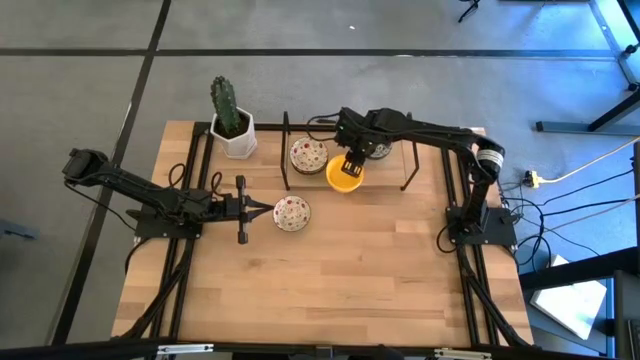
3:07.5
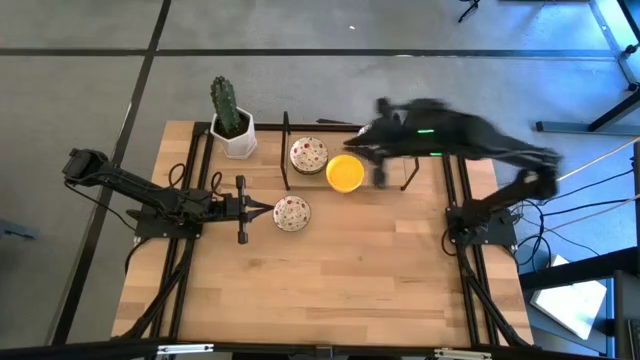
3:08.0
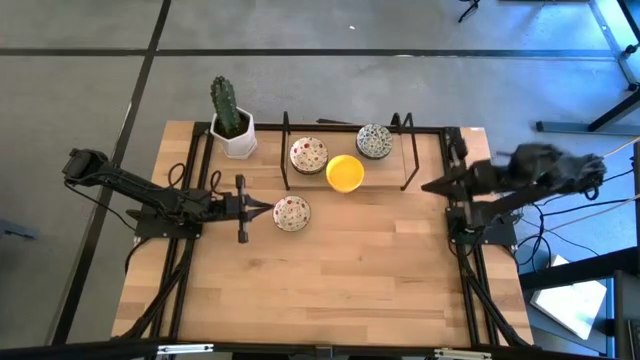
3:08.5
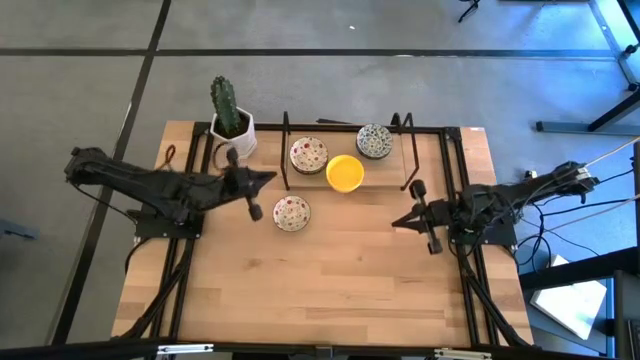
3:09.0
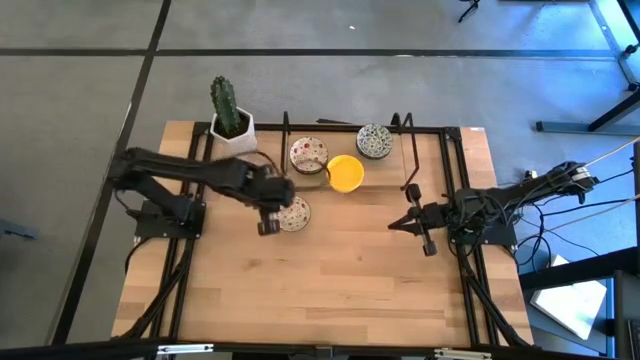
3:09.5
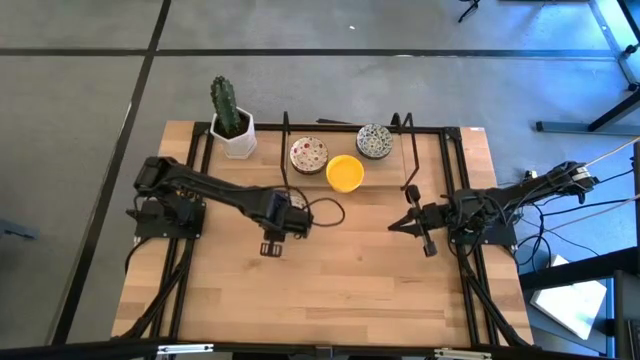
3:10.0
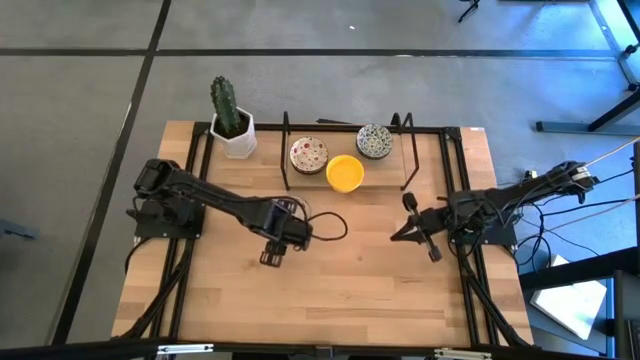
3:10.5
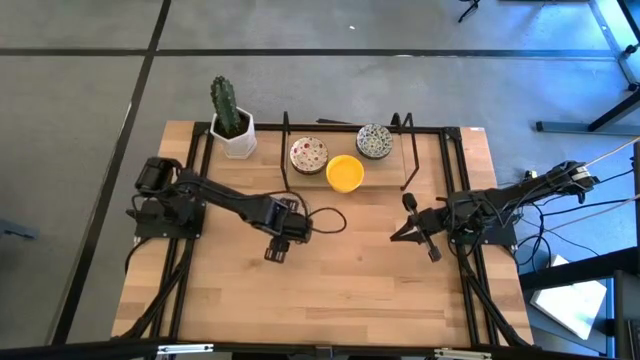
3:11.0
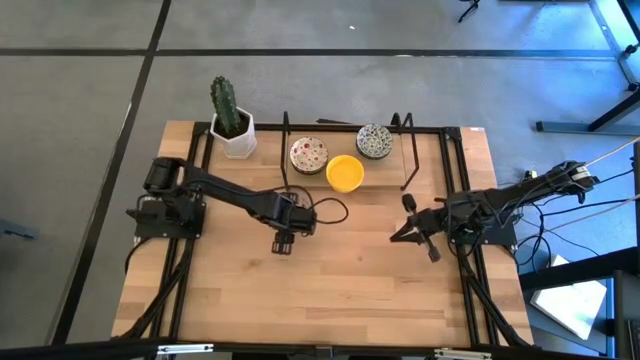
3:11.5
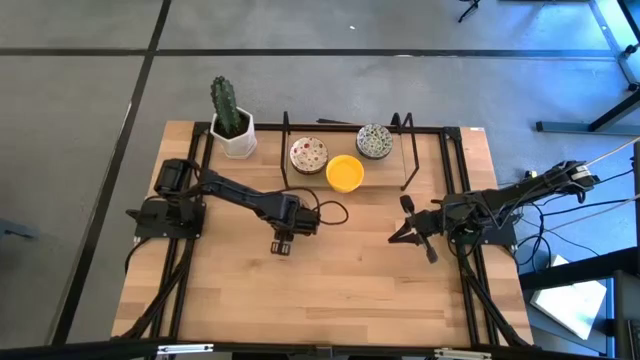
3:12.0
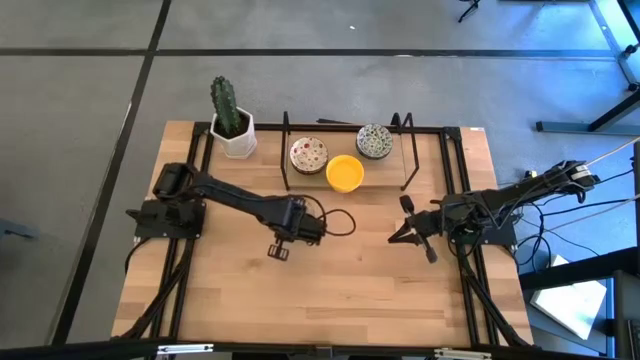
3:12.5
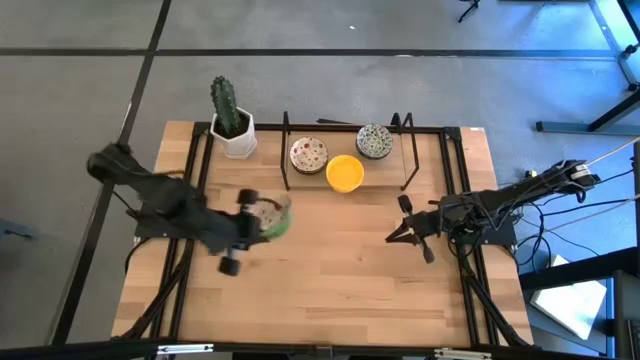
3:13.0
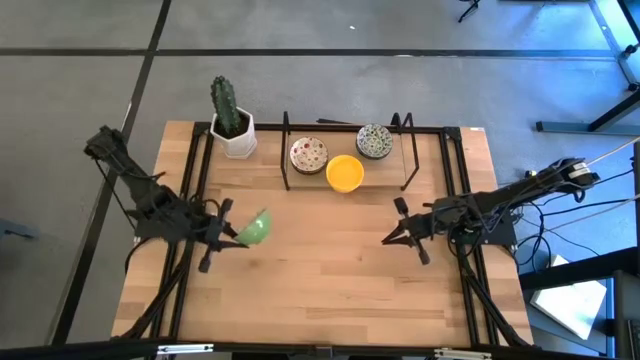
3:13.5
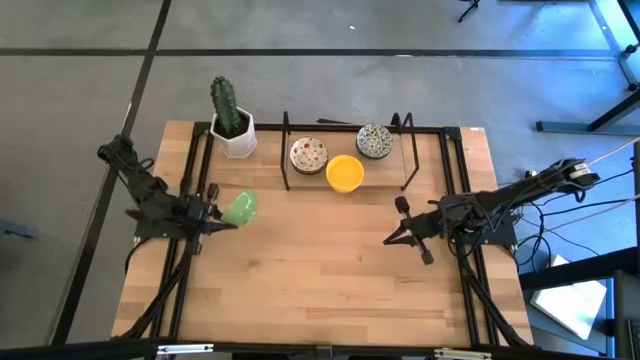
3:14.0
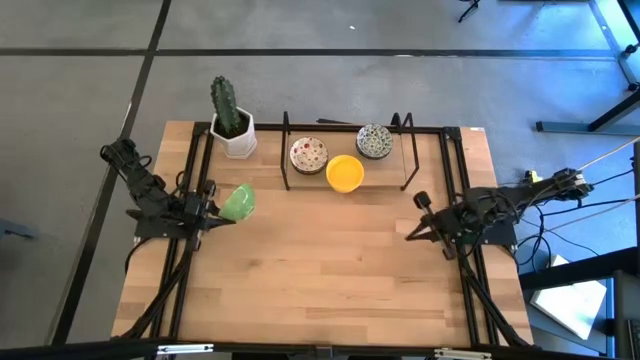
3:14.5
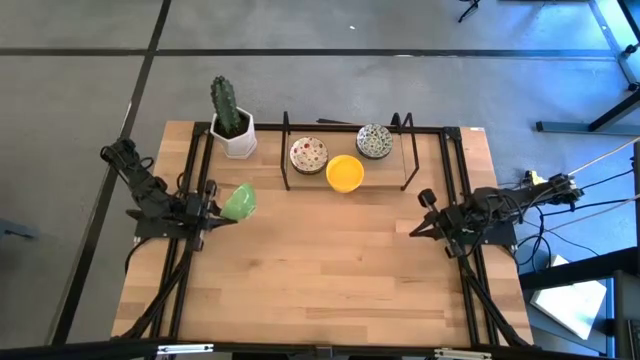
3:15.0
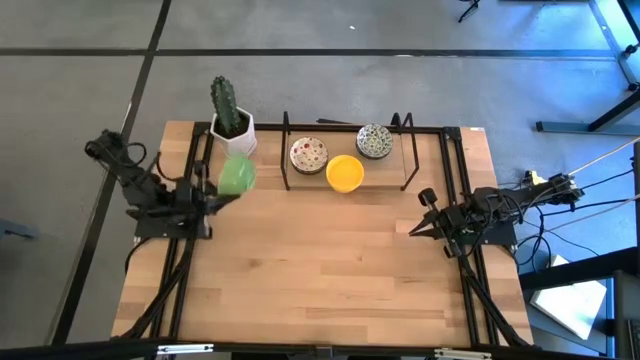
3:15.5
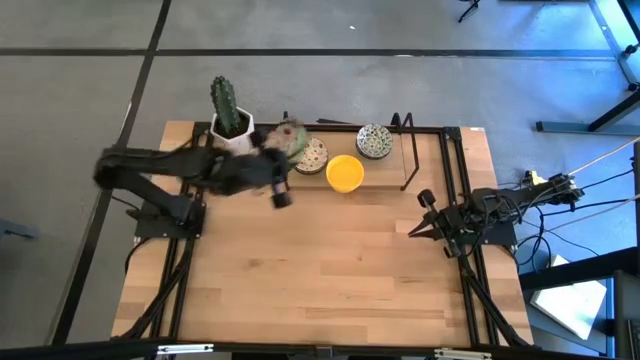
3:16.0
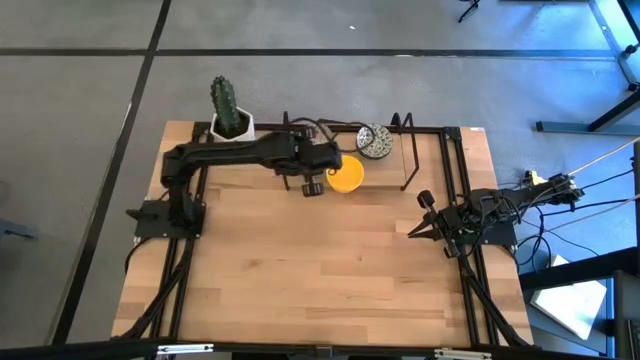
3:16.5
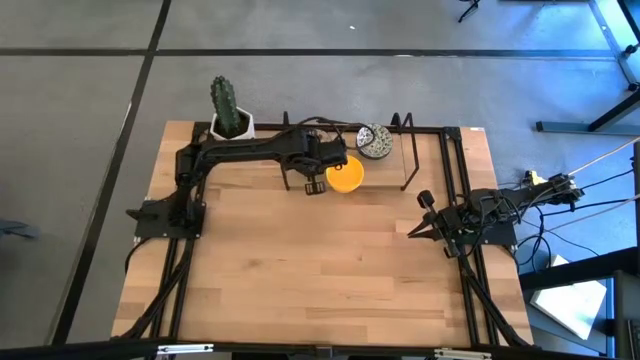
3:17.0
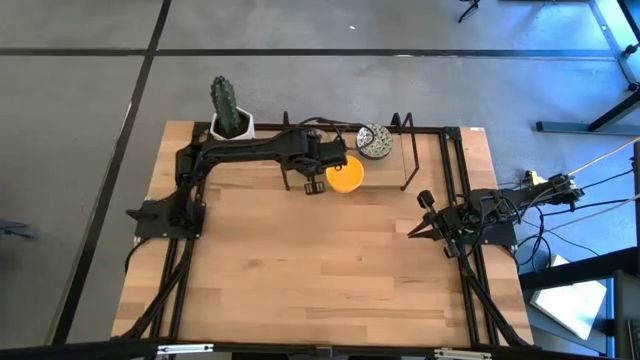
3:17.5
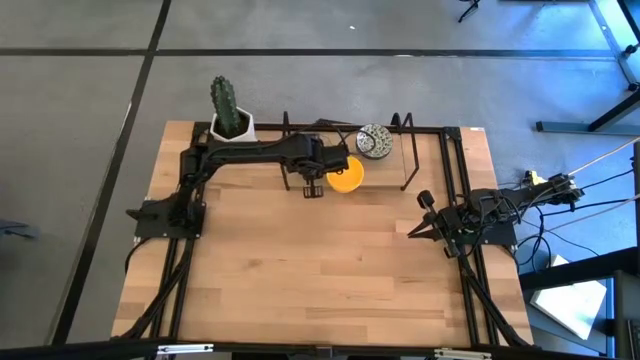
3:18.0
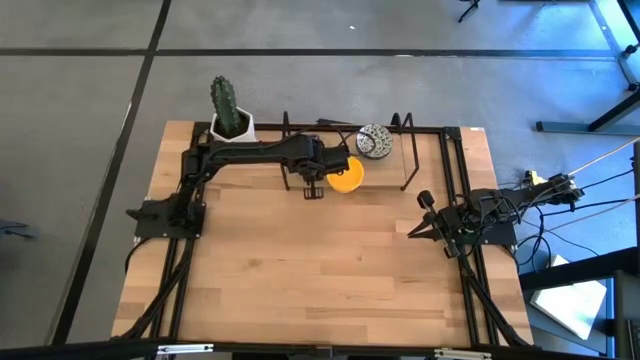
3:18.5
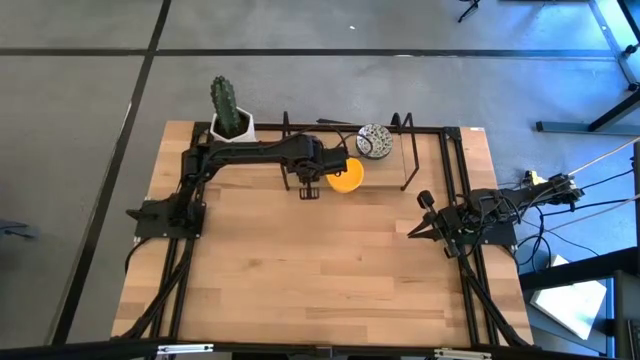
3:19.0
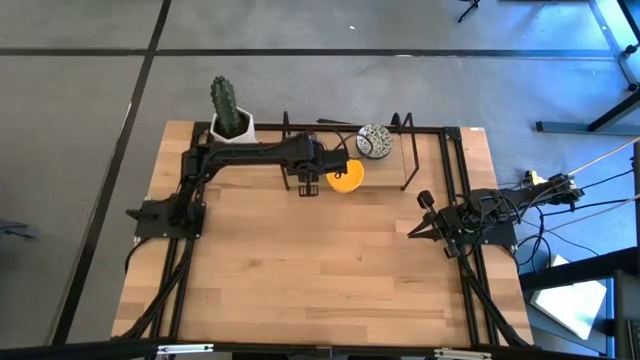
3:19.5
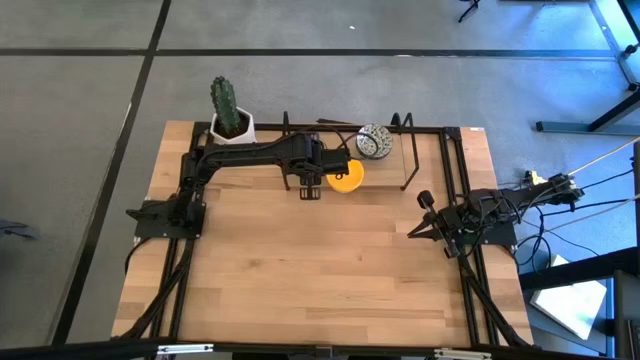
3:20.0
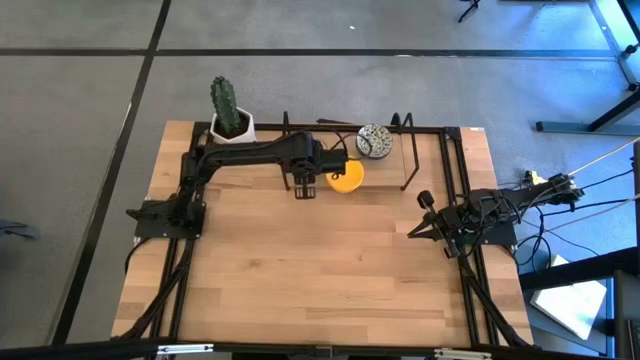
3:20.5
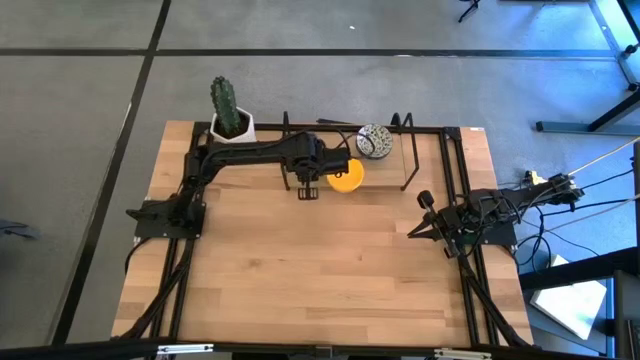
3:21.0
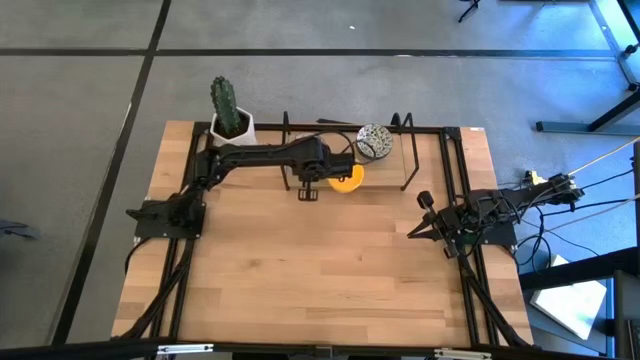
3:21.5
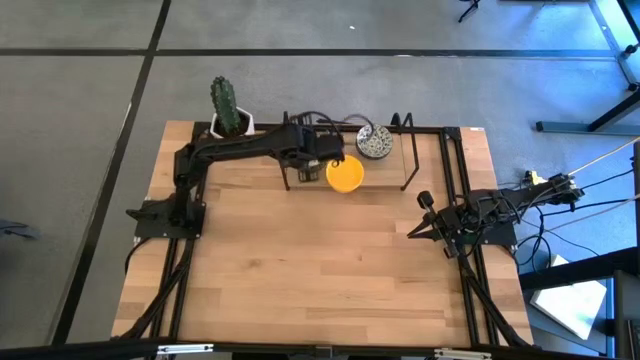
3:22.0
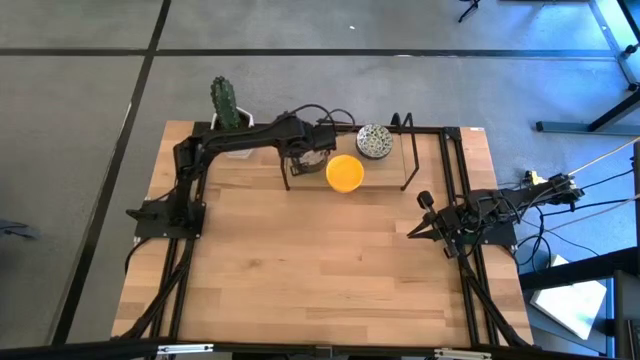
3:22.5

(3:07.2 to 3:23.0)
Task: Pick & Place Mini bowls
Stack the green patterned bowl on the green patterned bowls on the shelf

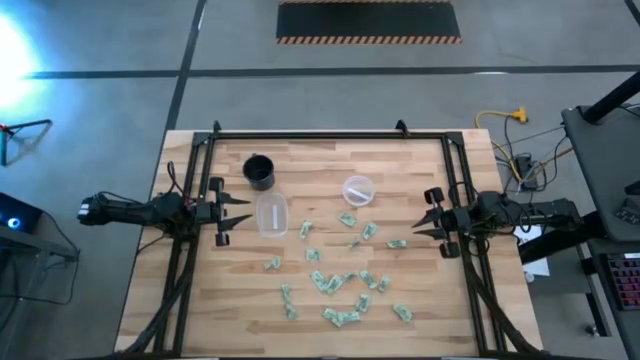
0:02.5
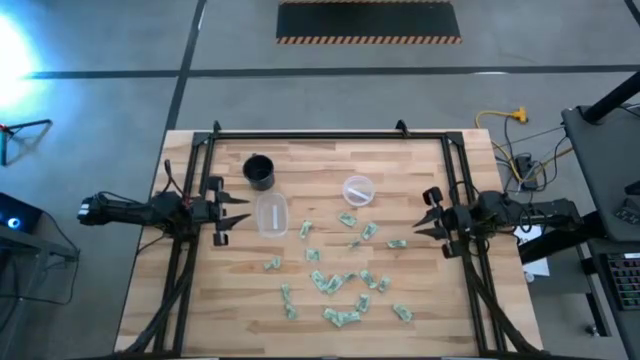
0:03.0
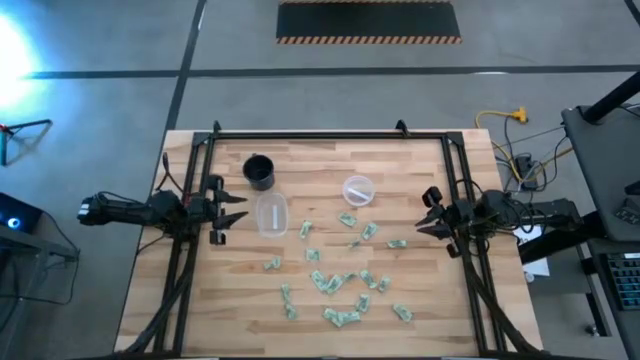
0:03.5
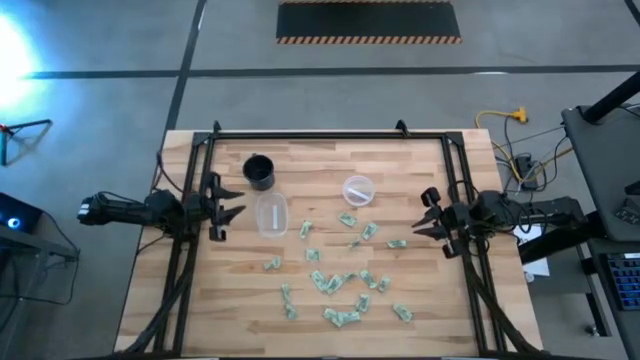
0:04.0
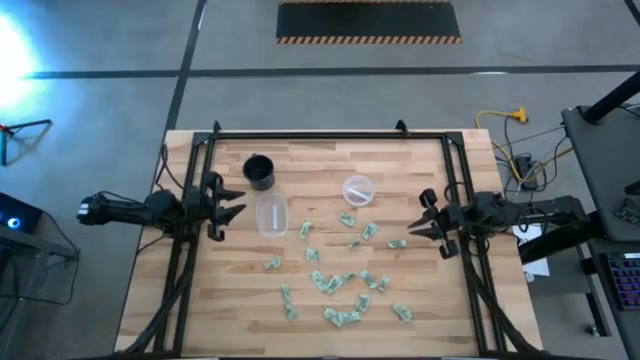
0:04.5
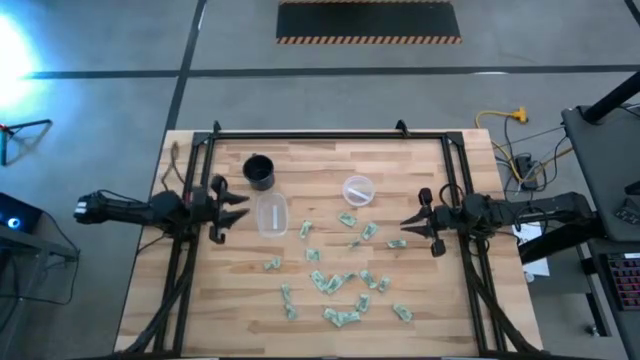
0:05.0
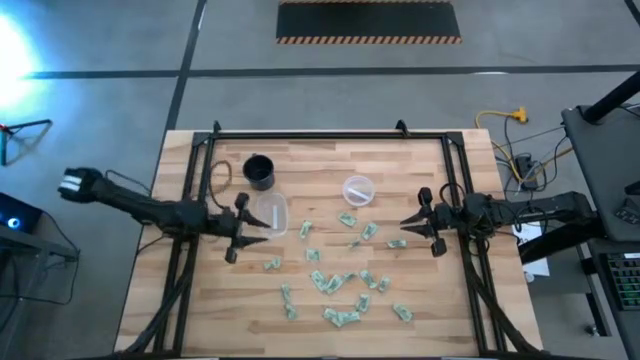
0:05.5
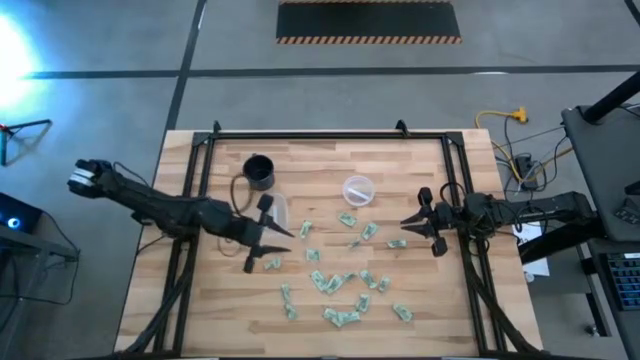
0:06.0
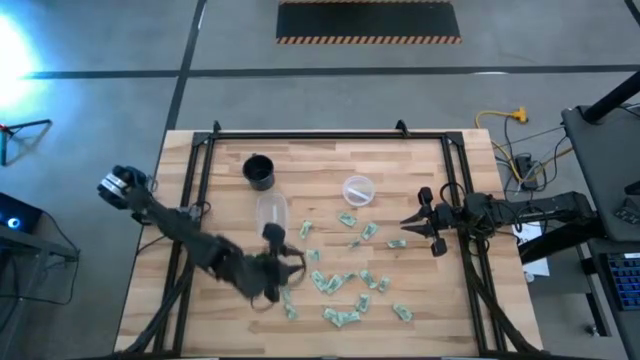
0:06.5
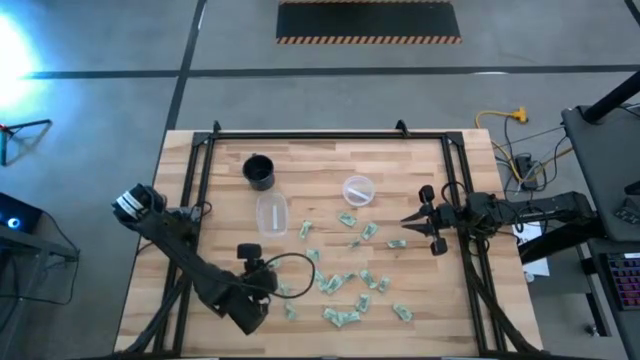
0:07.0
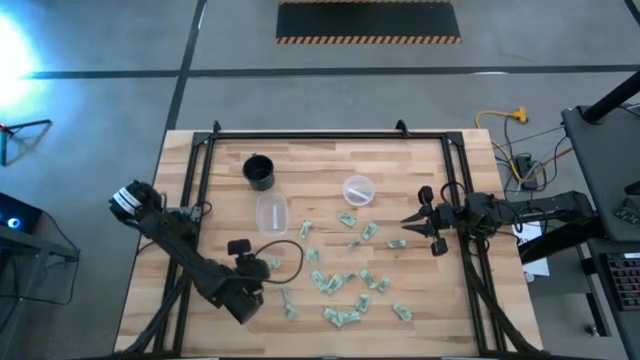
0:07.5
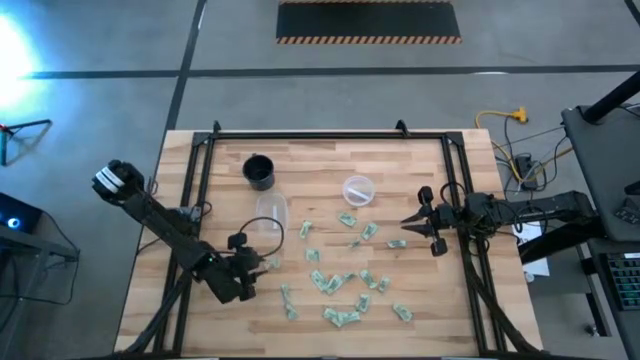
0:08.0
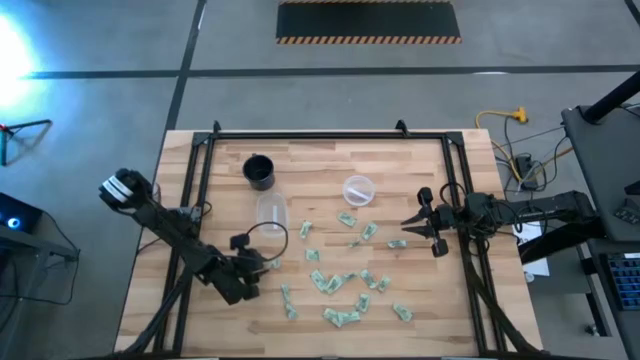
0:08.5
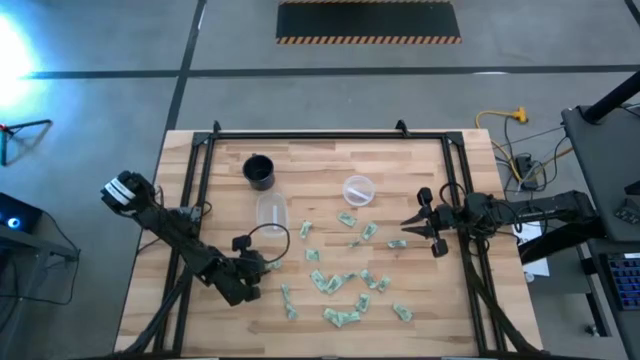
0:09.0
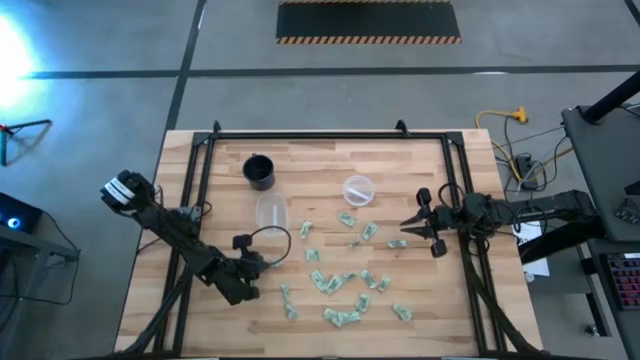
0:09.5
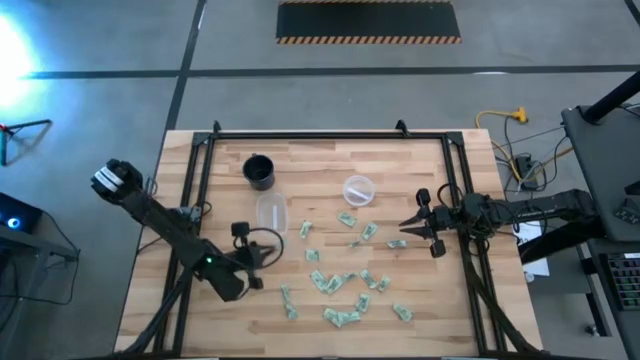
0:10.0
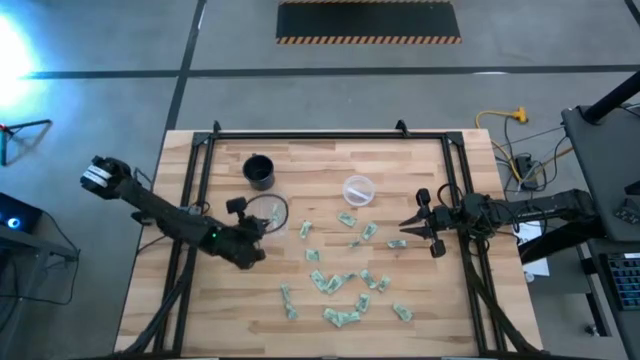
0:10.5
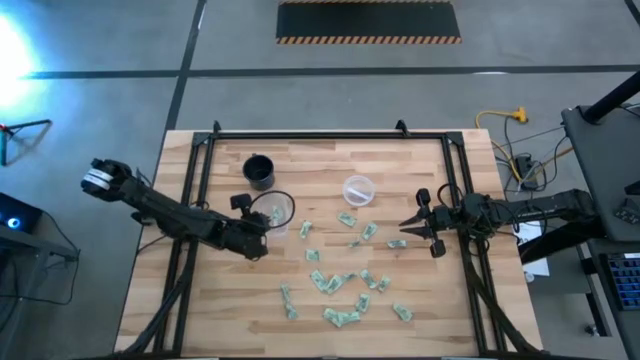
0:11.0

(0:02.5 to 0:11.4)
Task: Pick and place items into bin
Put the stevia packet into the left transparent bin
